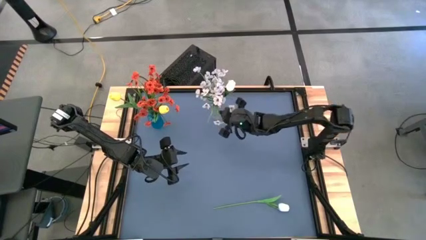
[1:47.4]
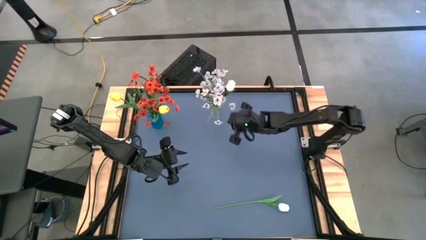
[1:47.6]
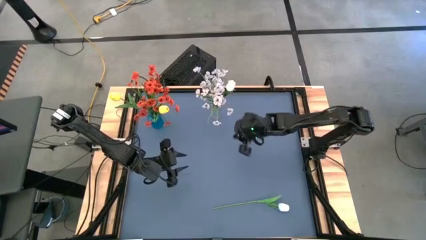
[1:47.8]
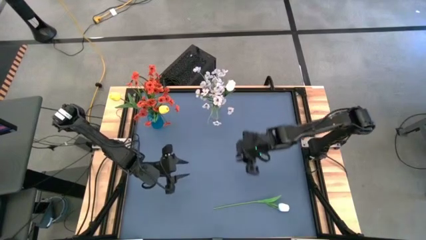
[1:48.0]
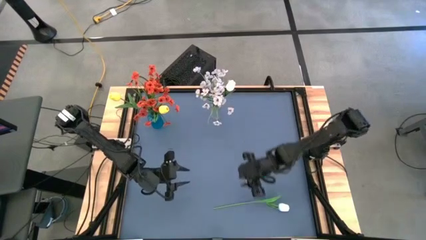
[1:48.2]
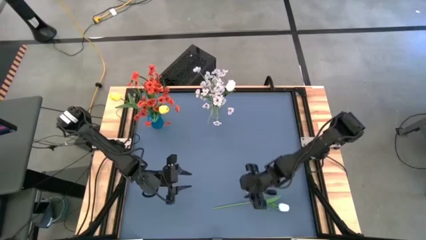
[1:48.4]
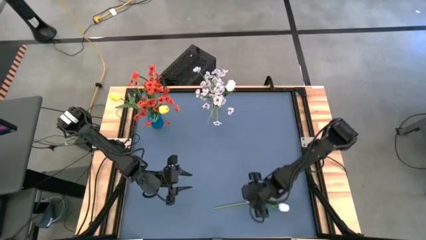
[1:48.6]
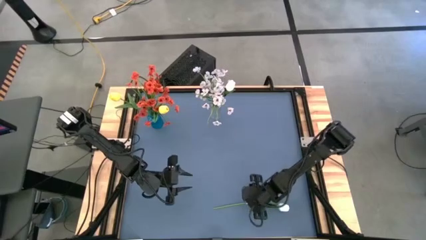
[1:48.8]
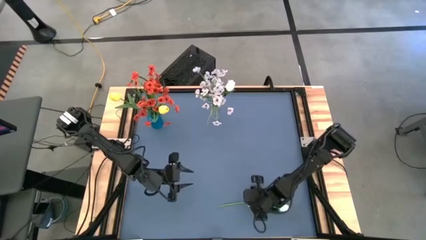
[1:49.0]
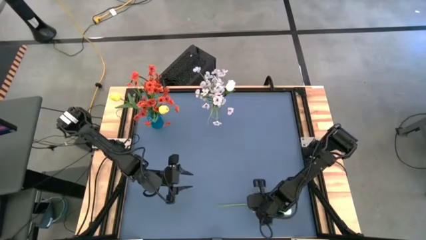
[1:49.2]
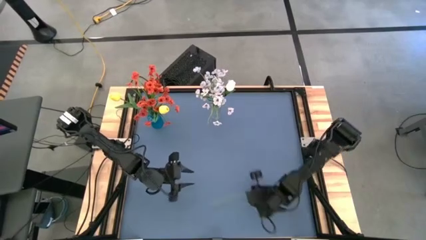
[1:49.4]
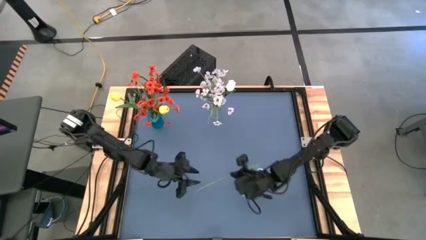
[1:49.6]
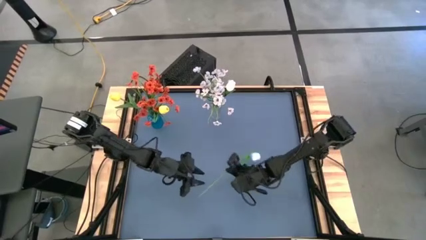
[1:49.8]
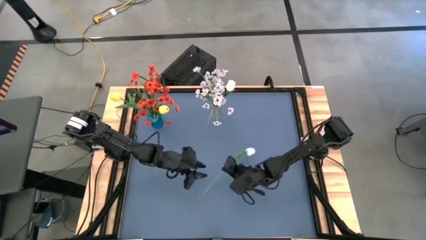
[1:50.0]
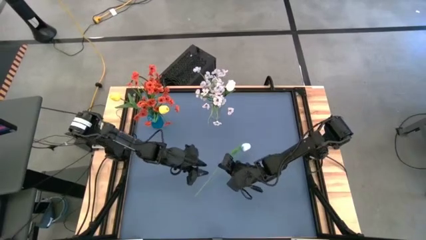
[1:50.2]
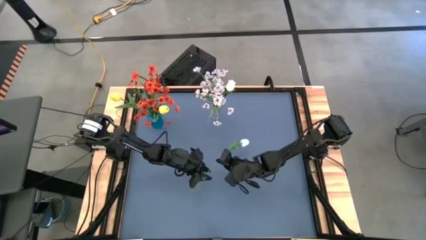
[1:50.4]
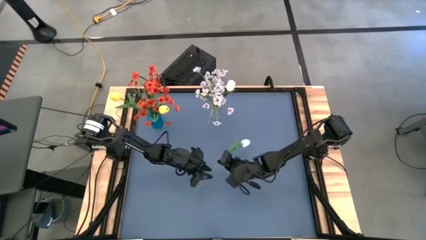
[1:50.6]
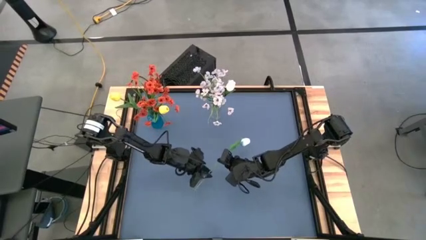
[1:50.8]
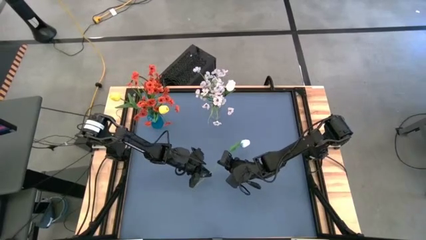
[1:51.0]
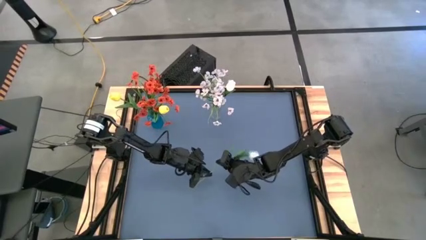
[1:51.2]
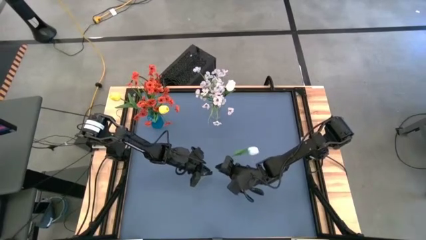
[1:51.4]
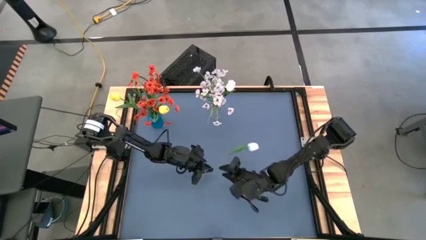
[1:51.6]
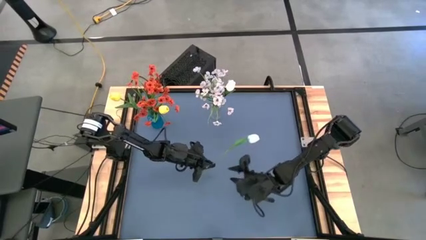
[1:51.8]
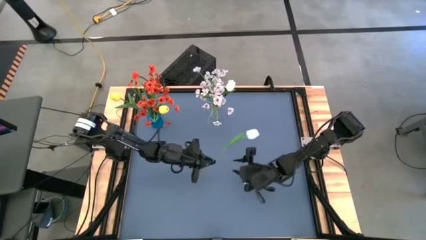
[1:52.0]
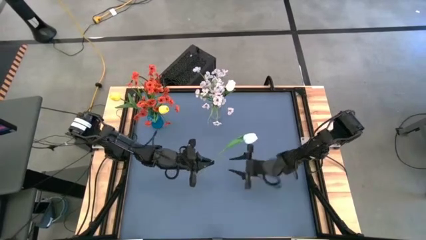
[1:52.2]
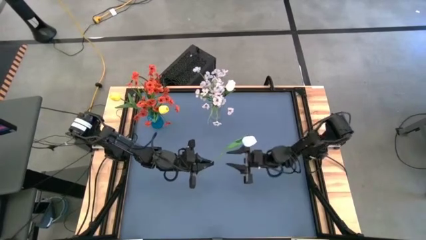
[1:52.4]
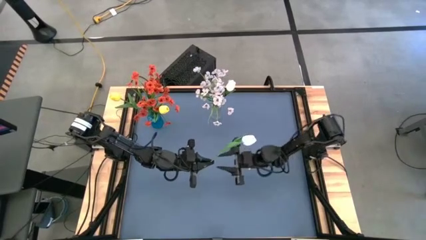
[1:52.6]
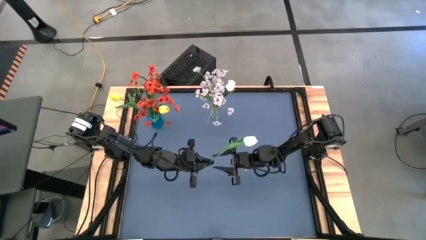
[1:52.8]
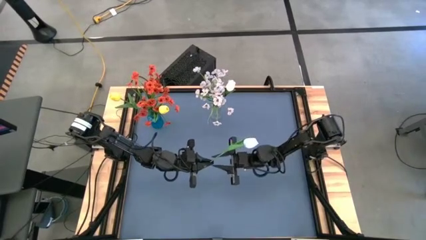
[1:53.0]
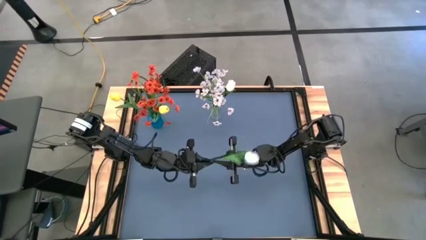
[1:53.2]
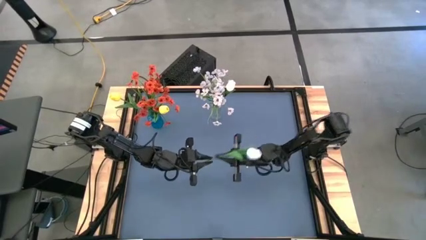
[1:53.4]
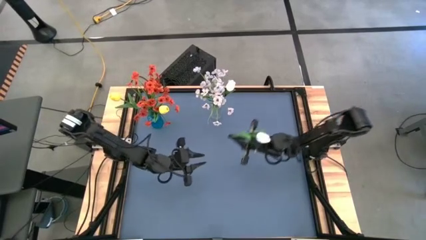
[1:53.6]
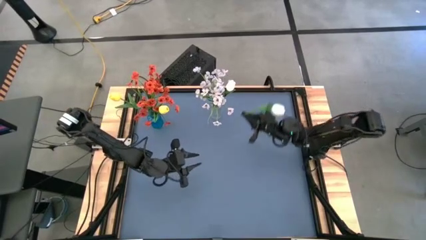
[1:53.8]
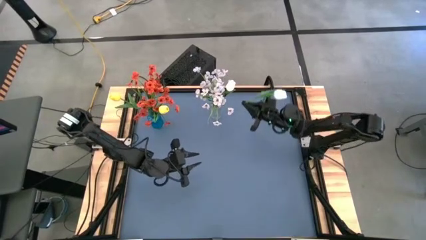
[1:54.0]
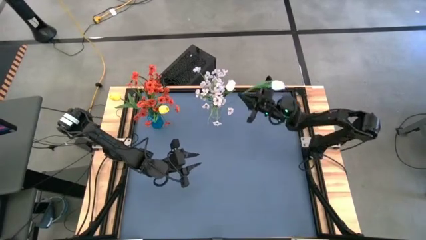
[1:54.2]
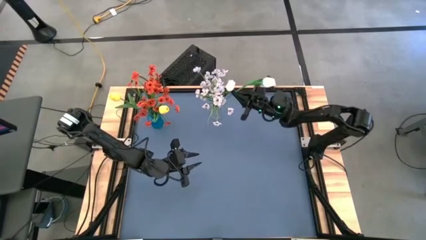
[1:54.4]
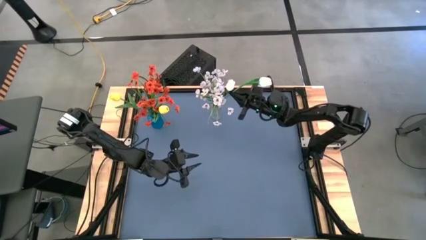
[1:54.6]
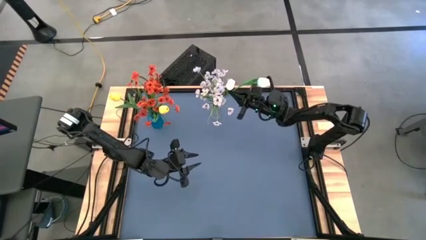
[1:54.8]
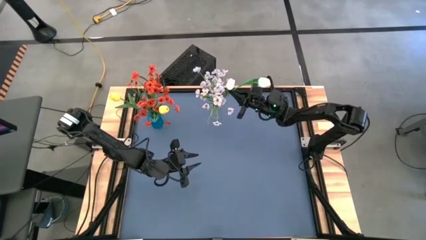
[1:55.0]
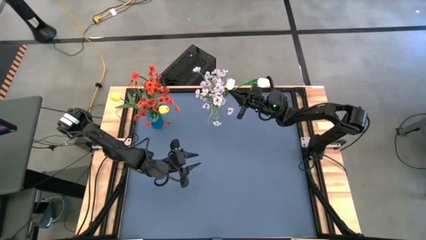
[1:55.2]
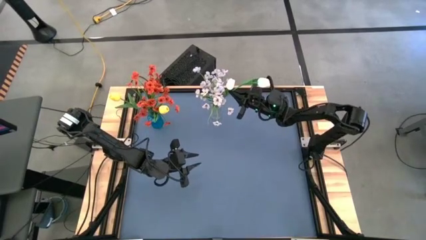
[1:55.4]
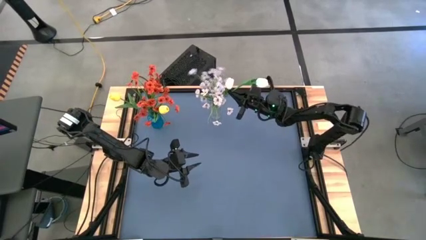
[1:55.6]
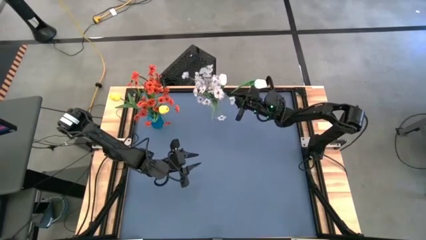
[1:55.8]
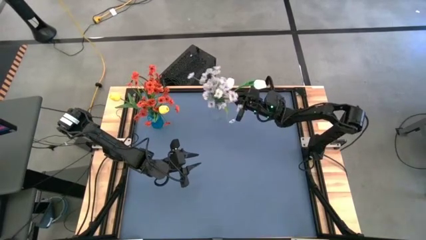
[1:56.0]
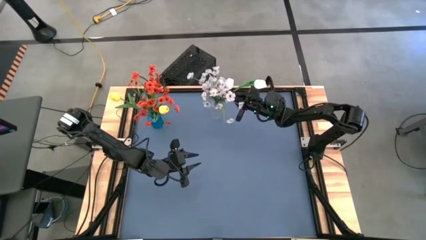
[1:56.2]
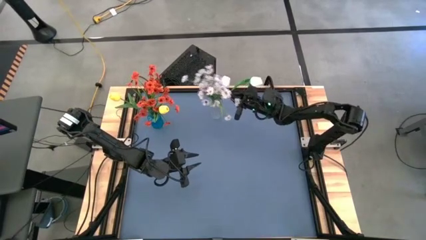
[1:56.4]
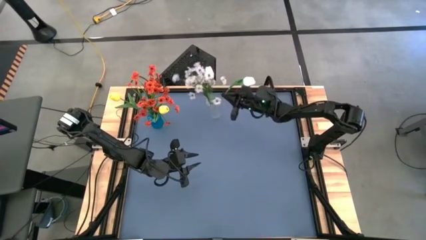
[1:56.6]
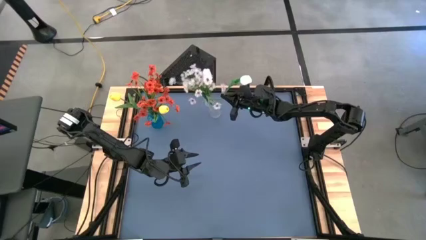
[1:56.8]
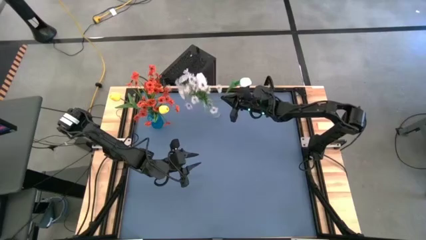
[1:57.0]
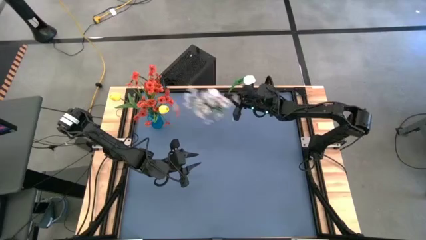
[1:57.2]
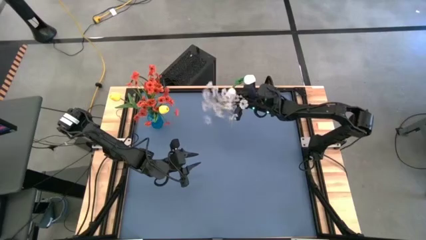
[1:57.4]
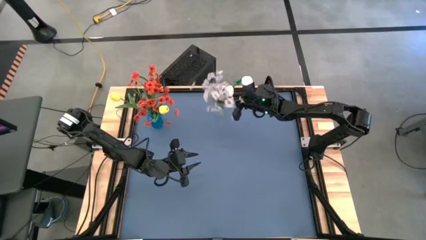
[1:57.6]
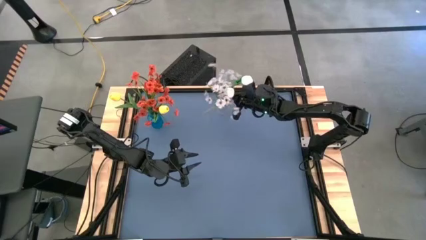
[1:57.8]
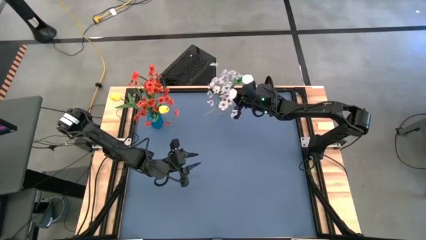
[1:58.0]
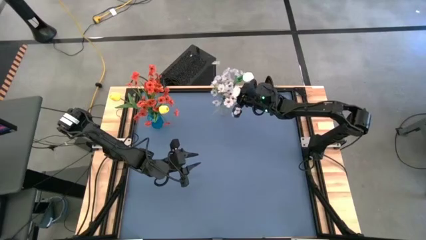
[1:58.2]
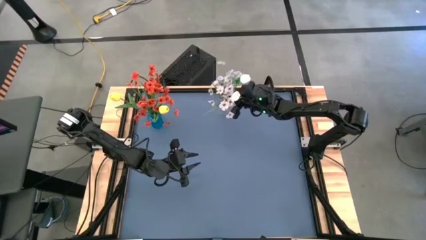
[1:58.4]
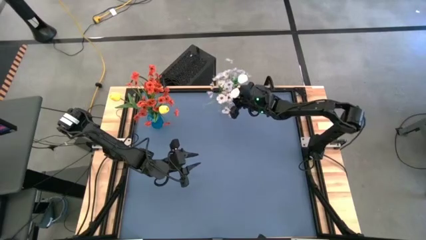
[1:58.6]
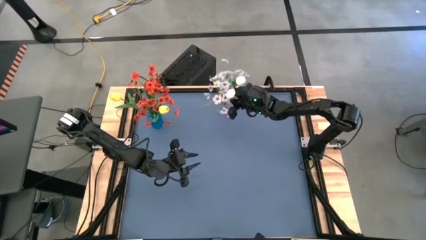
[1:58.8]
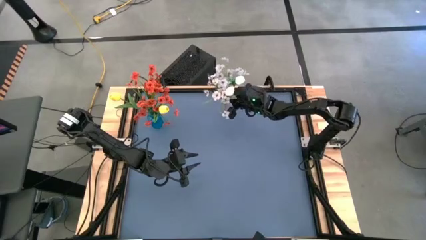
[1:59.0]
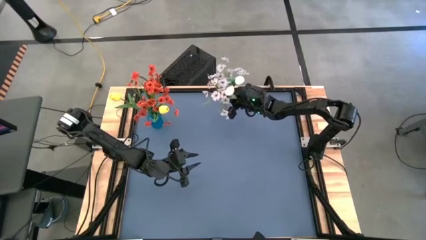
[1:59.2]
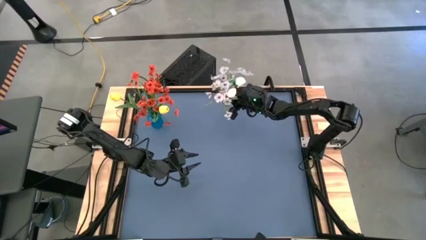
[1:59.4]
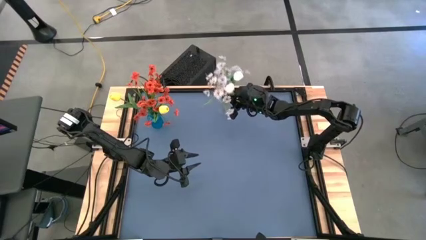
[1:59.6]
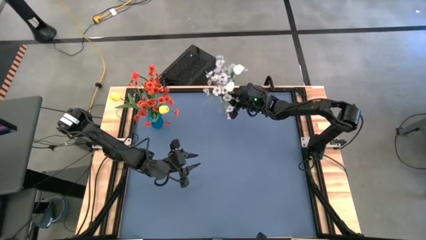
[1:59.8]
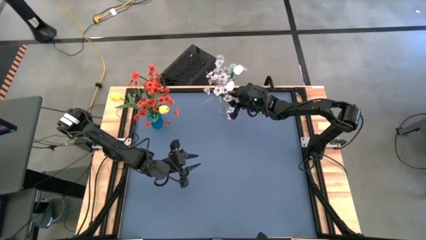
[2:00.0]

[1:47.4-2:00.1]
Task: Sort flowers into vase by color
Put the white tulip into the transparent vase
